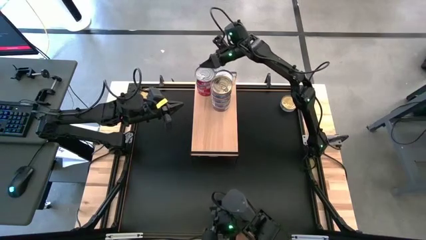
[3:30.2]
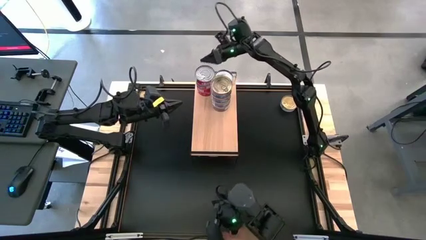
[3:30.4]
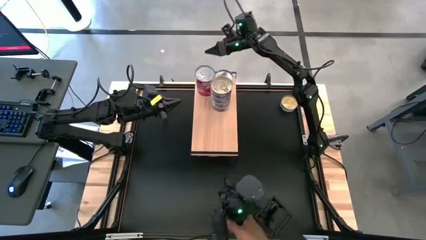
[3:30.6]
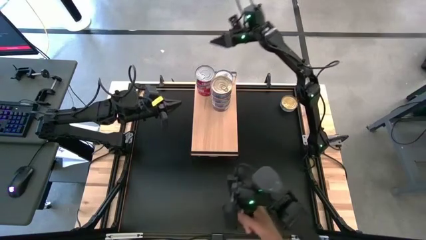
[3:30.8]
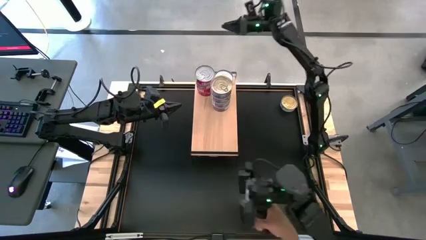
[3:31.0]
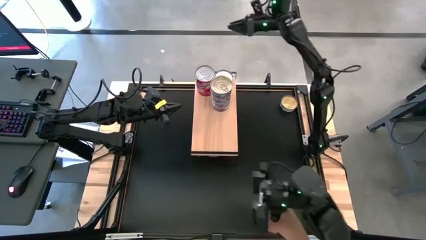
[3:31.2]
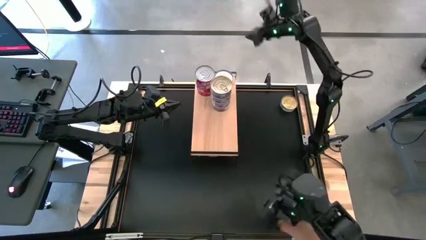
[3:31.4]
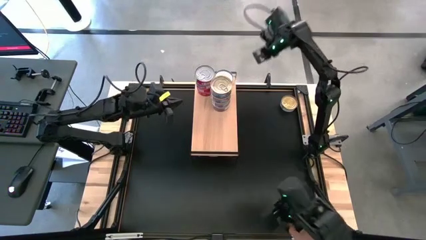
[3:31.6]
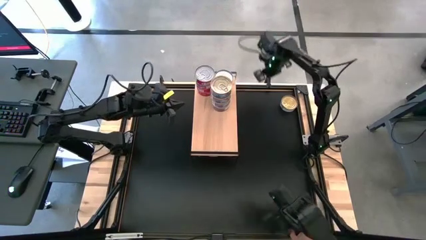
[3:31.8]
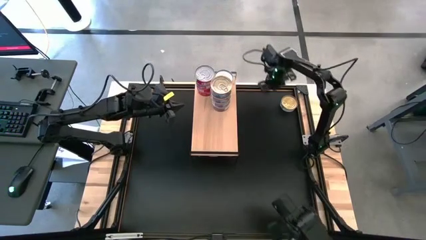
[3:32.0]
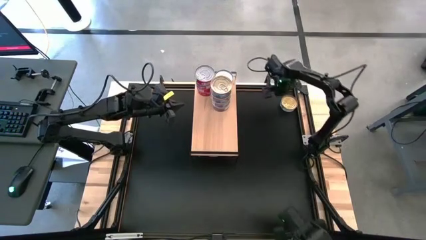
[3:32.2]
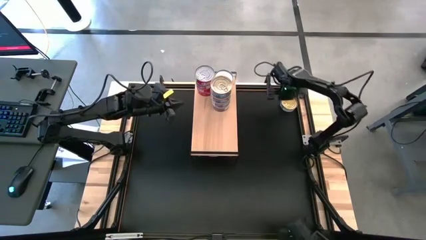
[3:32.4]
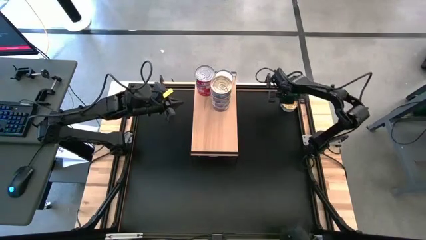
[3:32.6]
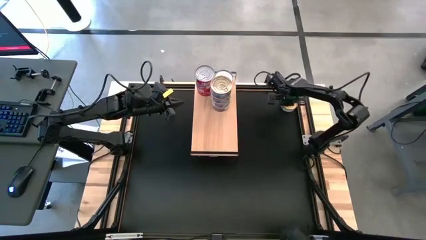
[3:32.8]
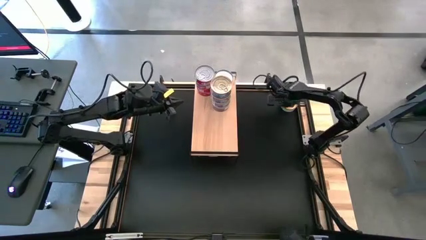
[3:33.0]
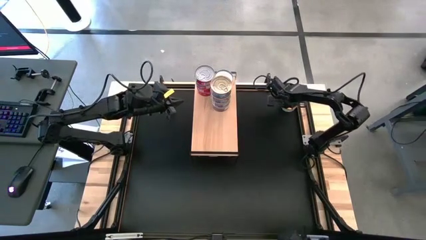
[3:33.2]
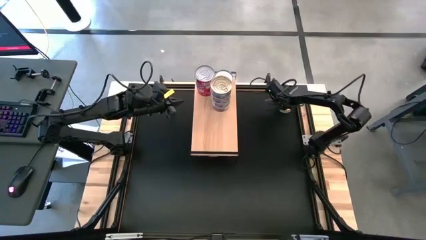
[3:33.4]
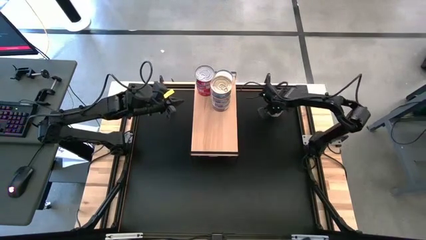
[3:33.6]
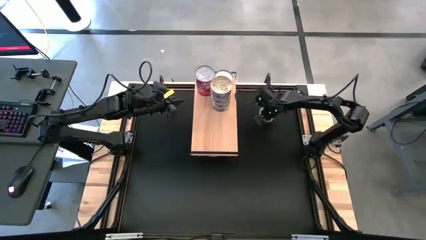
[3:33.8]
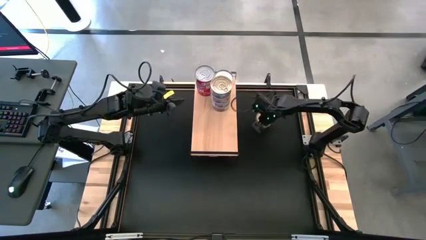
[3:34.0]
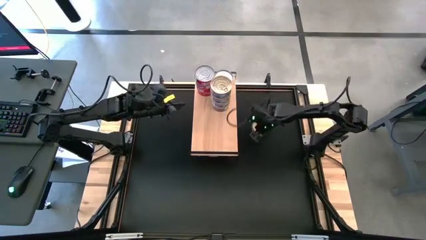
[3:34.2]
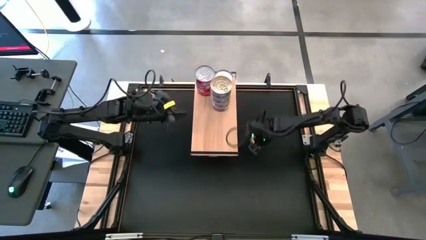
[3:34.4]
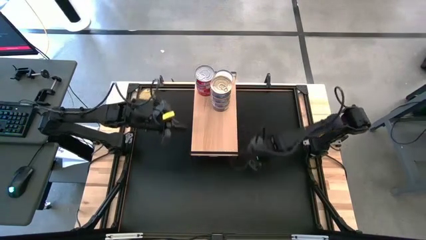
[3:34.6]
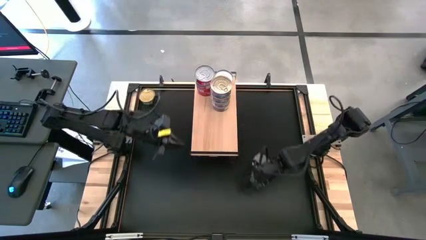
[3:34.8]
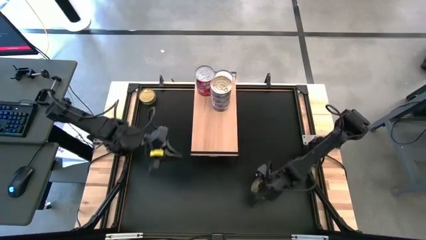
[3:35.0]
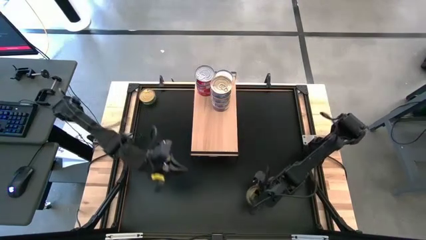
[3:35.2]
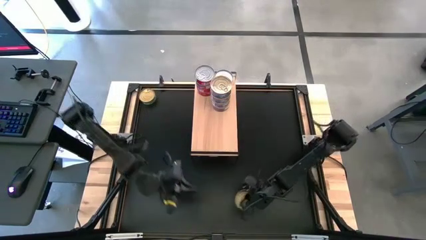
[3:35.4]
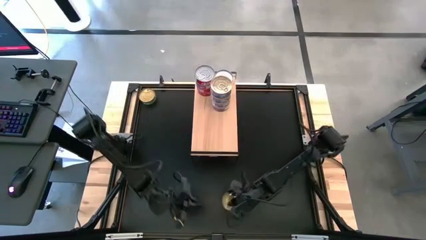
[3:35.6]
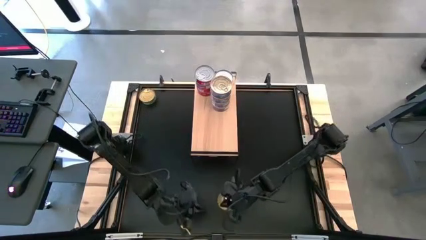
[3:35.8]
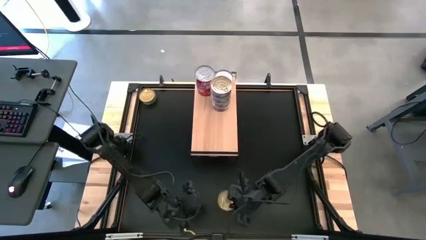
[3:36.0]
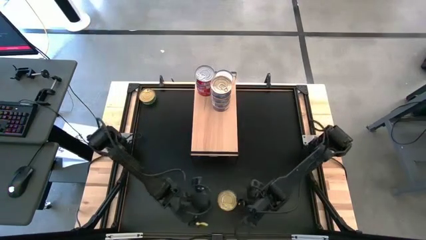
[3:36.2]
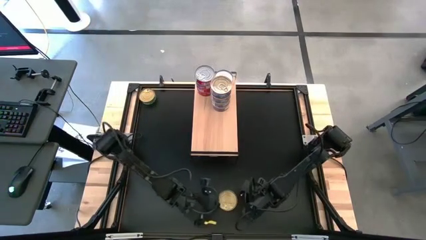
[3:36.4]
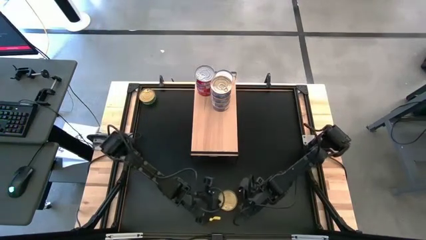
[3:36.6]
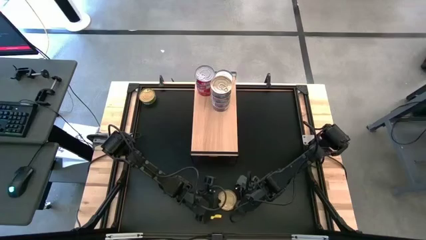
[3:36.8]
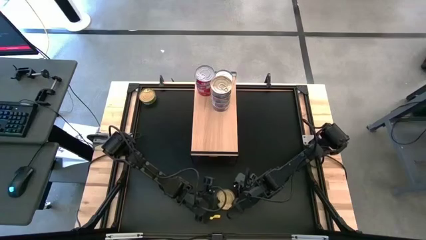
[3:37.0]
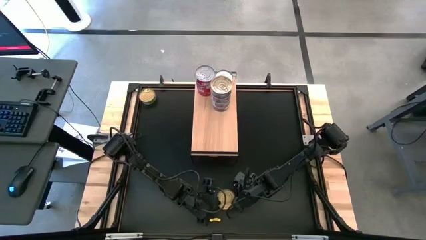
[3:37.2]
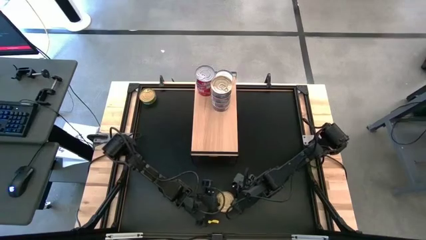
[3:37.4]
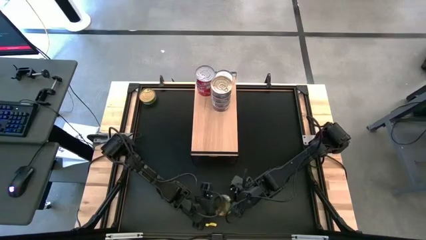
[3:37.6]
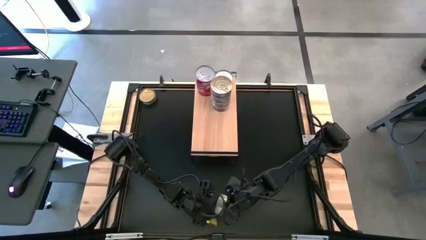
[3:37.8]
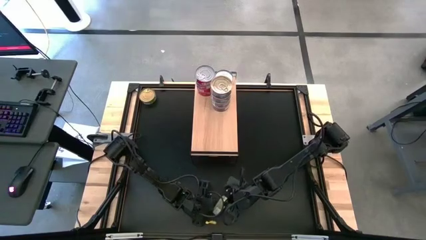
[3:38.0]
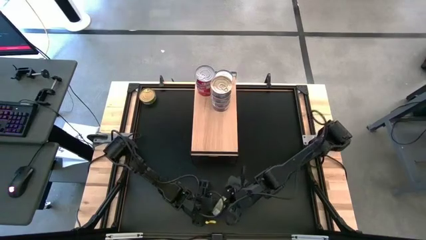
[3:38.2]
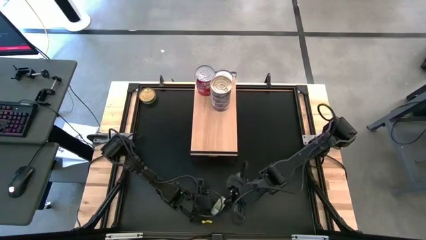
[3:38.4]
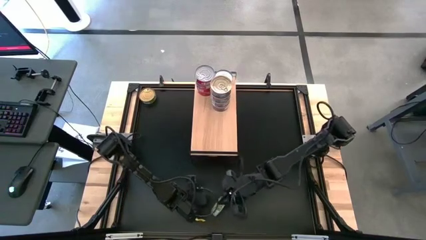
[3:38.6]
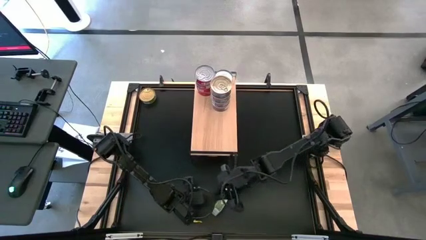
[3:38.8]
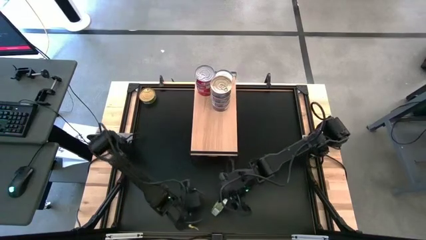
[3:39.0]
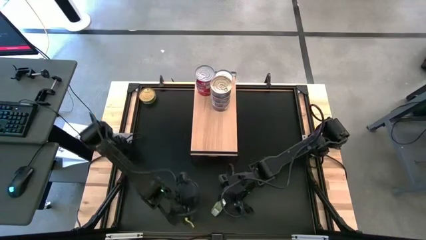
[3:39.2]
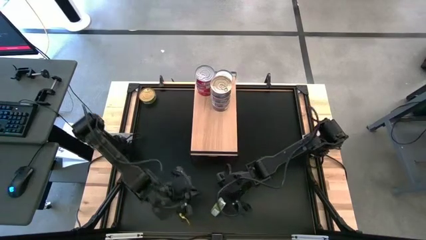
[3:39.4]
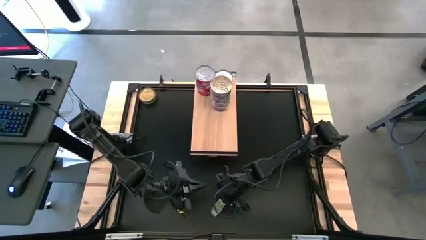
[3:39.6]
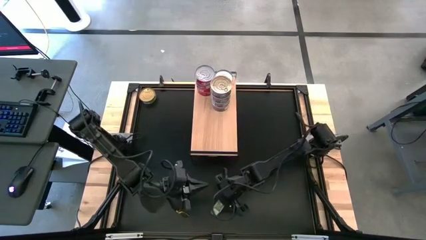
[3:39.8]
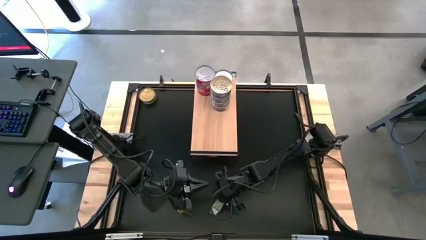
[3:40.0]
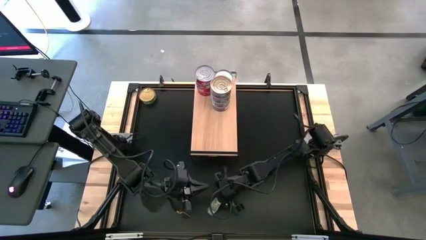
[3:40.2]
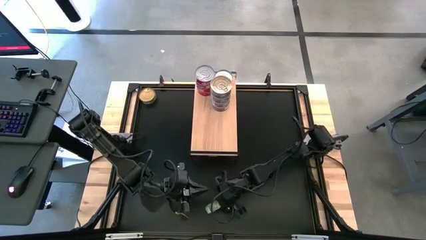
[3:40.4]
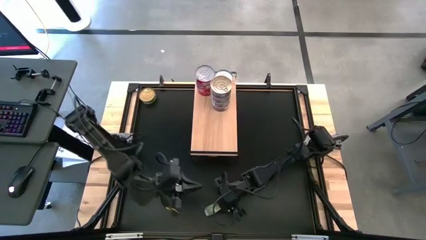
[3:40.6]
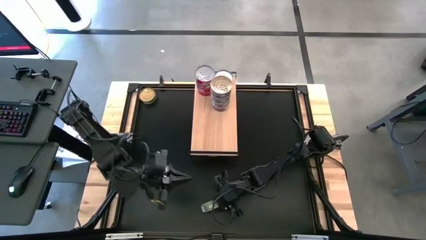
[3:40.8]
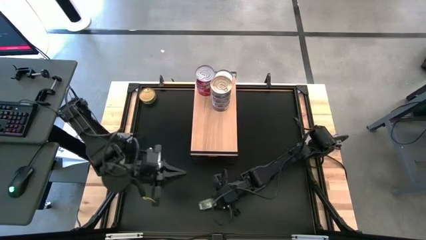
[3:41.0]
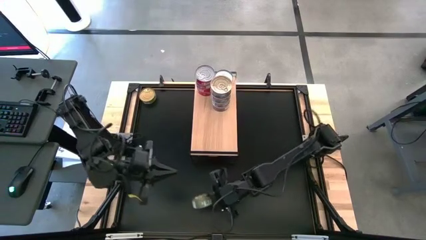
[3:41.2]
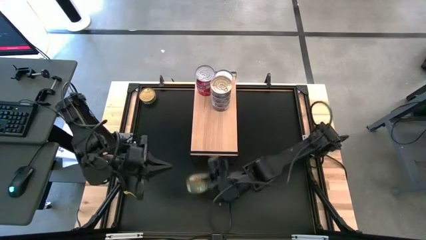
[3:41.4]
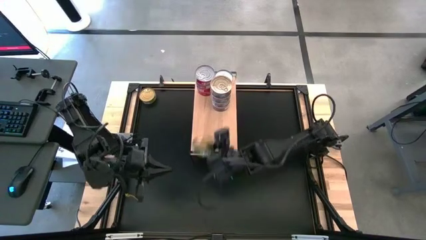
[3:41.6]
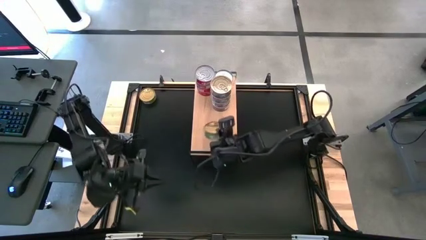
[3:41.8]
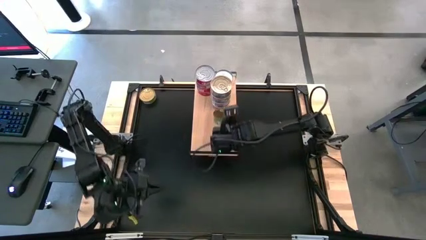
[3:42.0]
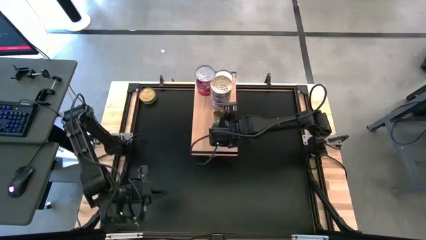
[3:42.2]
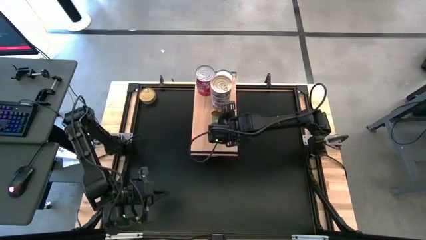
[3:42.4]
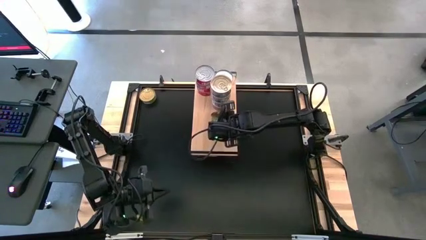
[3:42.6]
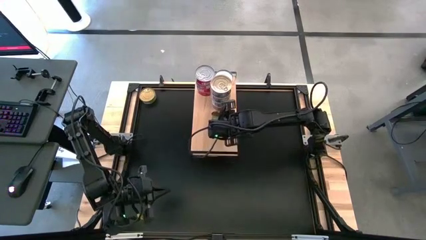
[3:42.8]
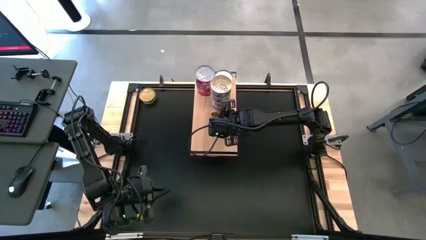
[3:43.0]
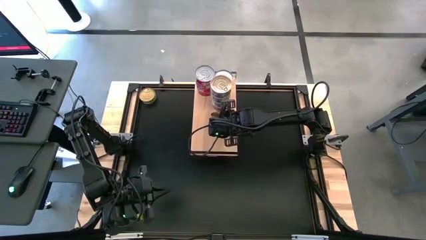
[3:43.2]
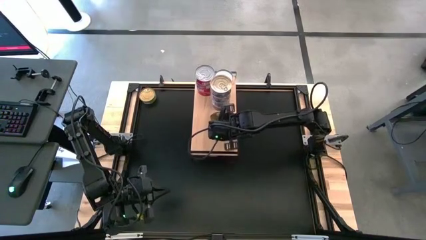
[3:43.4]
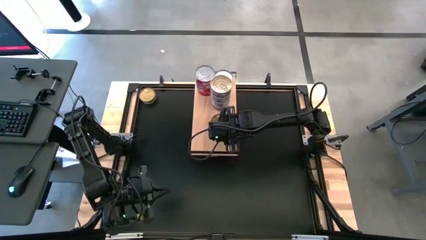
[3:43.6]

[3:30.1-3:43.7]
Task: Stack canned seafood by type on shelf
Put the green tuna can on the shelf

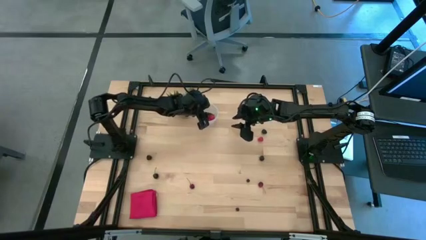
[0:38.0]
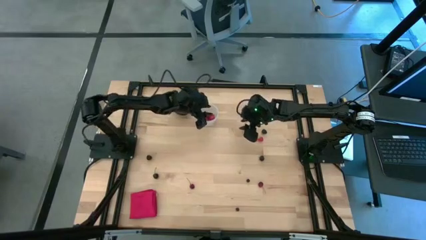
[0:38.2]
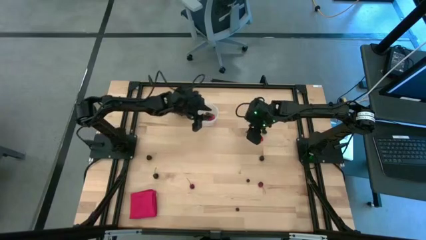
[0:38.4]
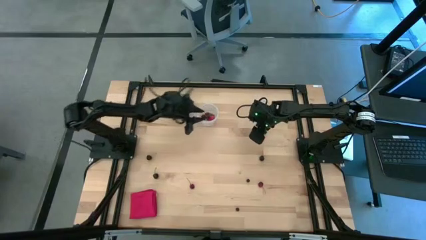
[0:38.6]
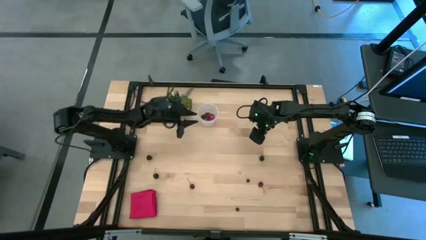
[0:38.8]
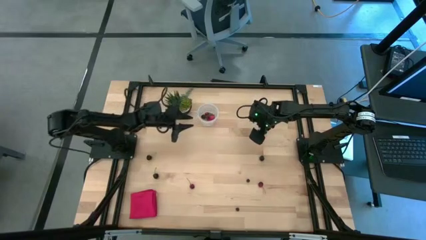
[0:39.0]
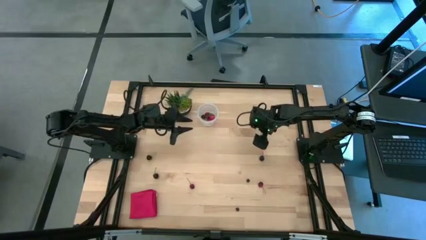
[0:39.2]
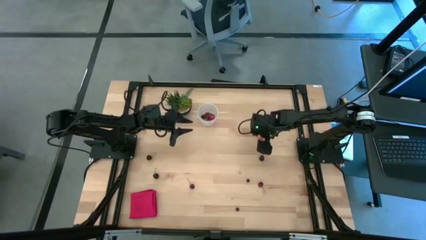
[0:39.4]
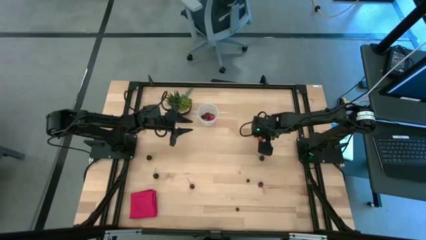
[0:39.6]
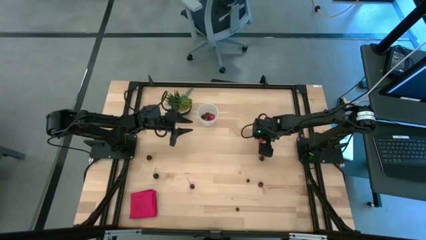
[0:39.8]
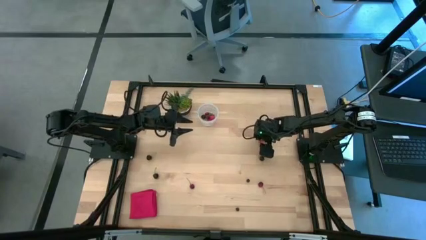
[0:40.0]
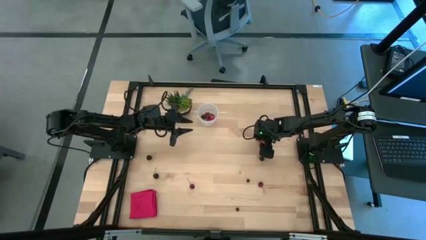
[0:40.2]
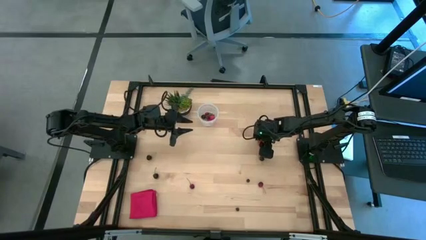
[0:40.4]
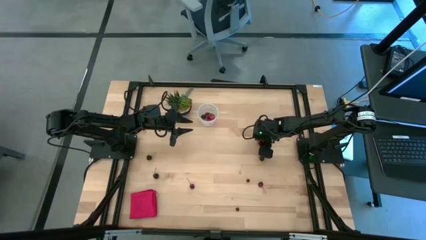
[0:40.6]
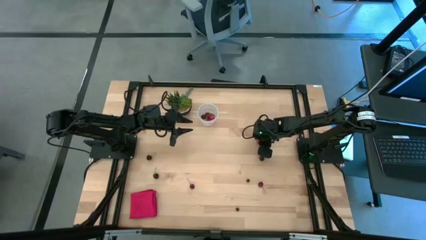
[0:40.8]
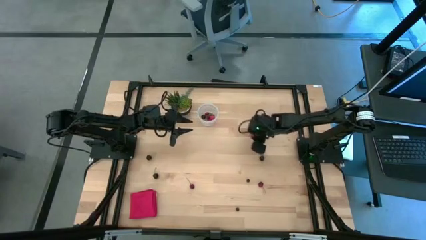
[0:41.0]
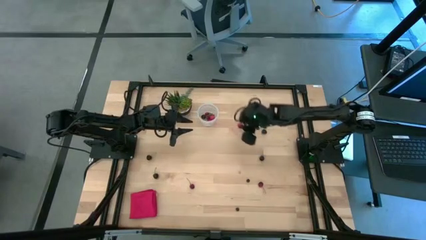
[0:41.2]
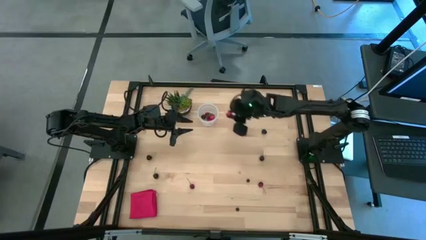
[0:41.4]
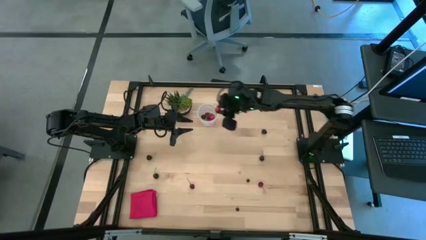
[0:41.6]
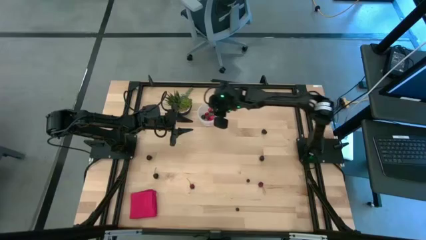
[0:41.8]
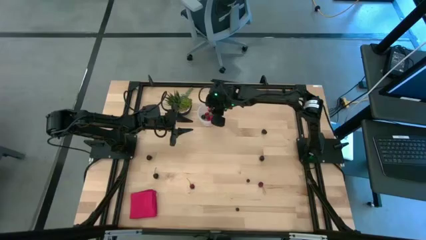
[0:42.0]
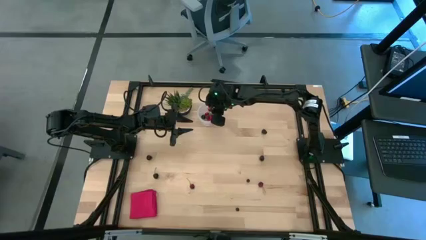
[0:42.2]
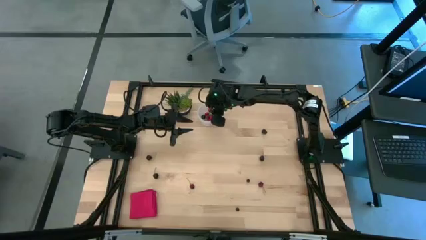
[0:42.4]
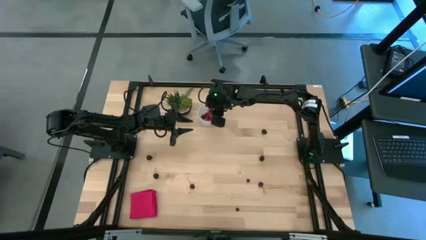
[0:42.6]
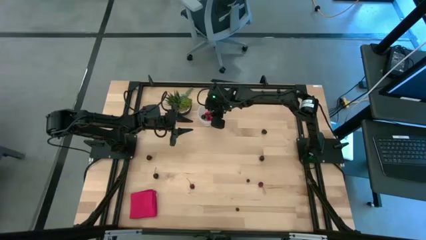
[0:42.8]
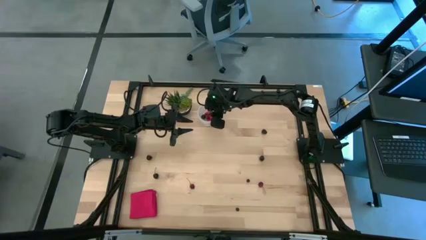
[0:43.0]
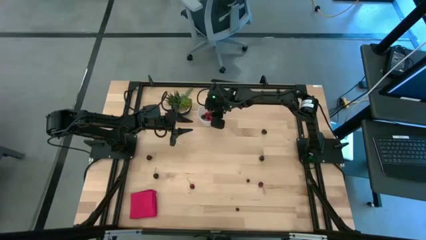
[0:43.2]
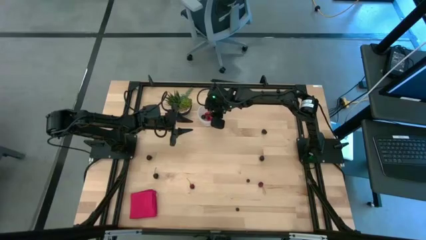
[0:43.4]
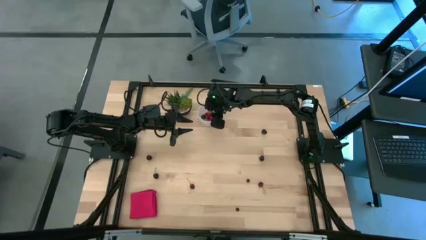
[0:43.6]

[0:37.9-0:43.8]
Task: Pick and placing Produce into tupperware
Put the red raspberry into the transparent container
